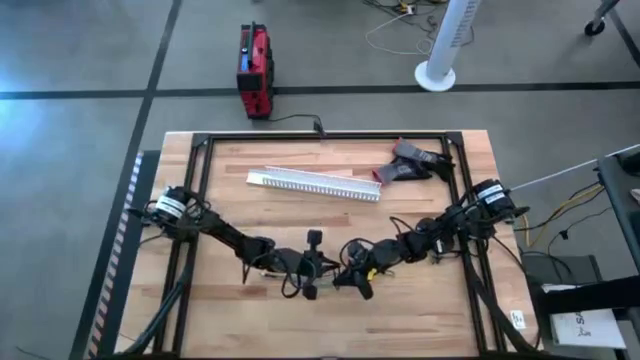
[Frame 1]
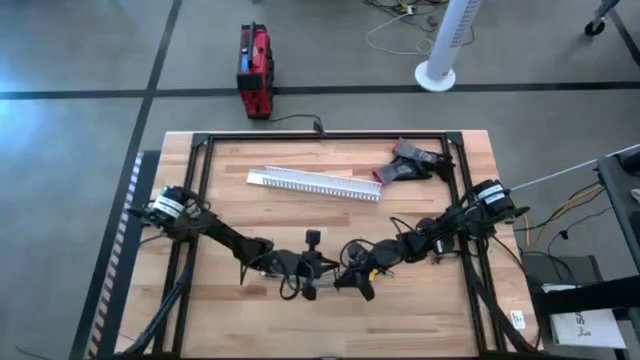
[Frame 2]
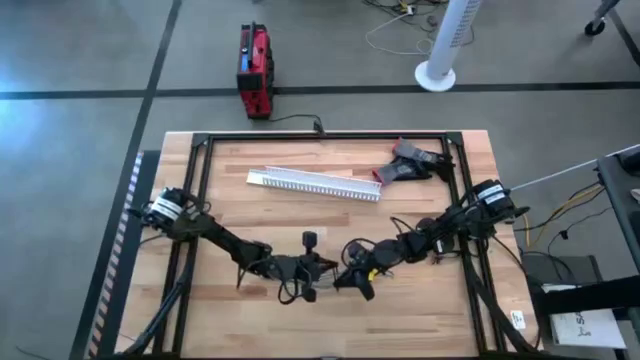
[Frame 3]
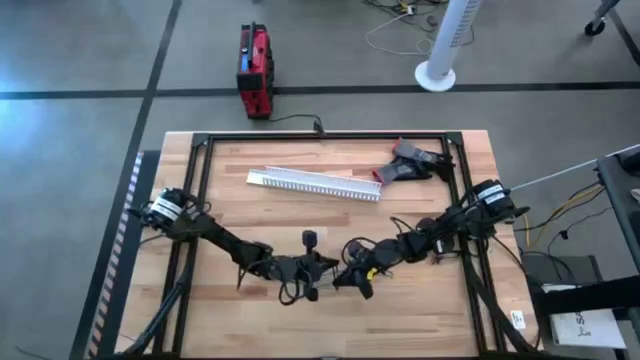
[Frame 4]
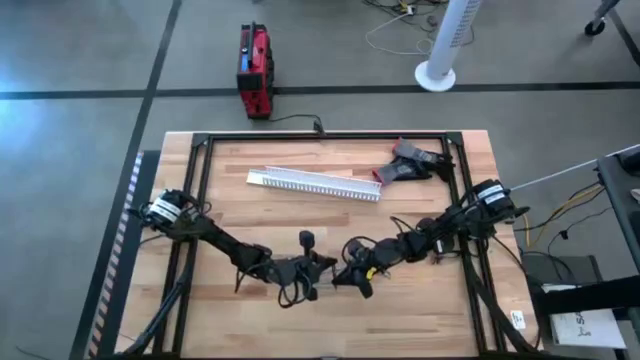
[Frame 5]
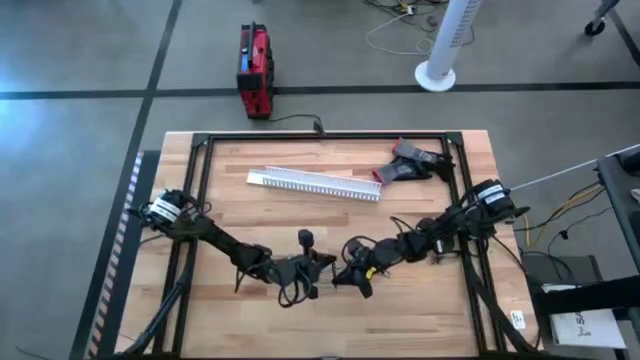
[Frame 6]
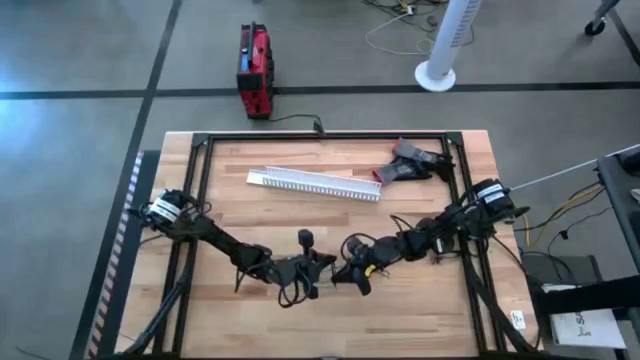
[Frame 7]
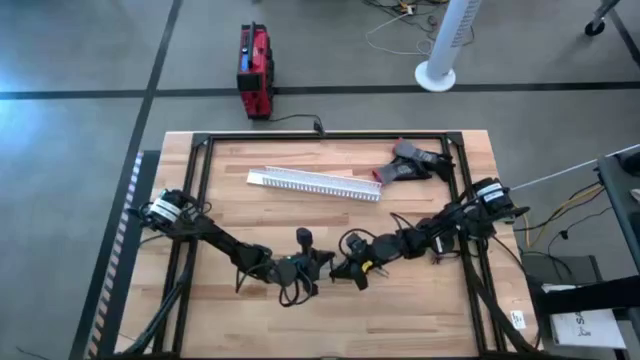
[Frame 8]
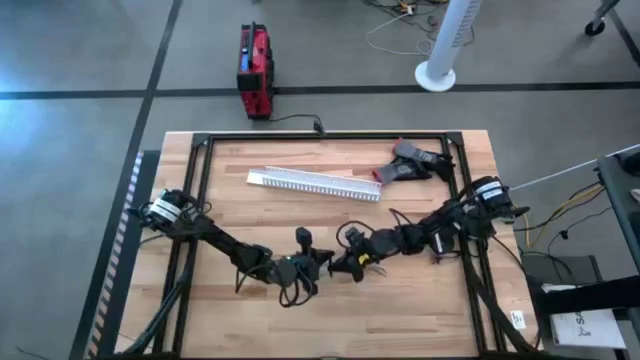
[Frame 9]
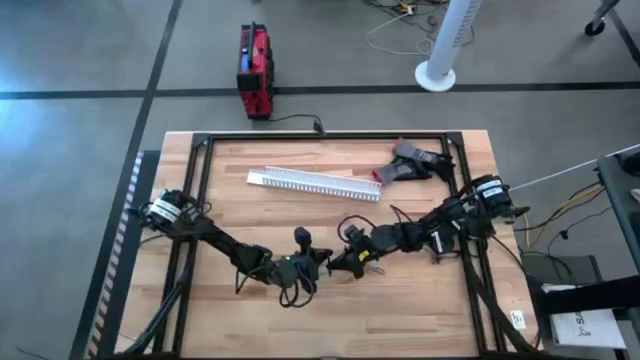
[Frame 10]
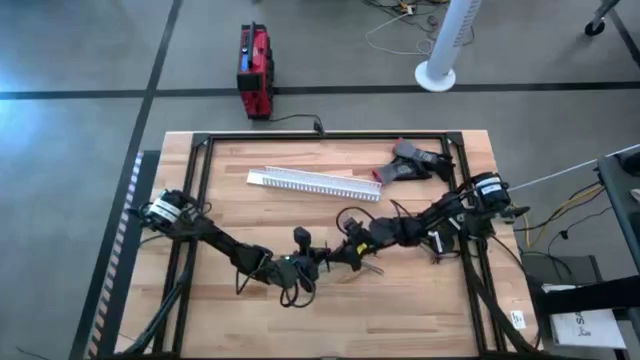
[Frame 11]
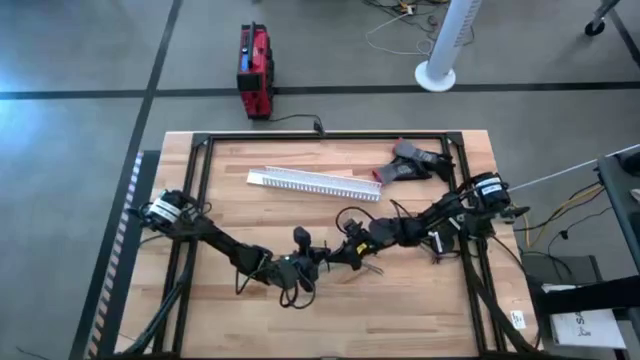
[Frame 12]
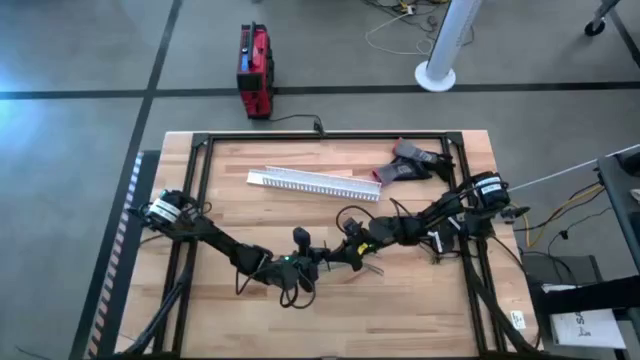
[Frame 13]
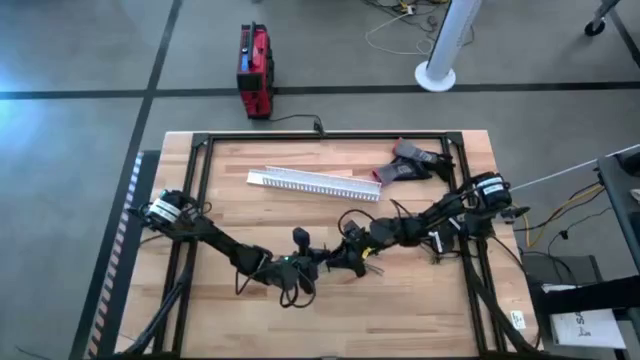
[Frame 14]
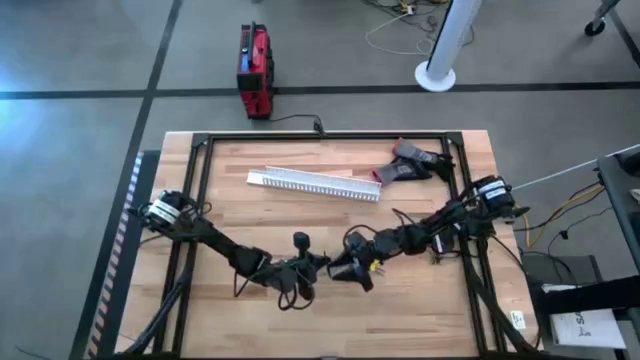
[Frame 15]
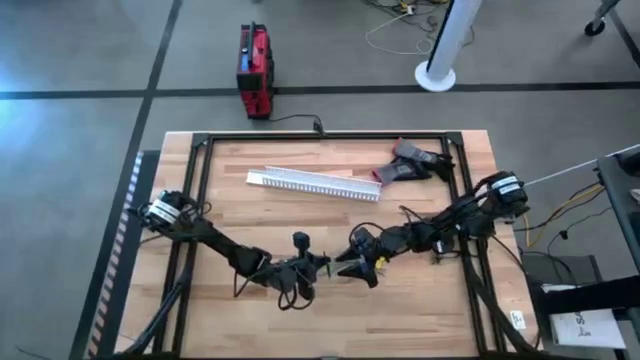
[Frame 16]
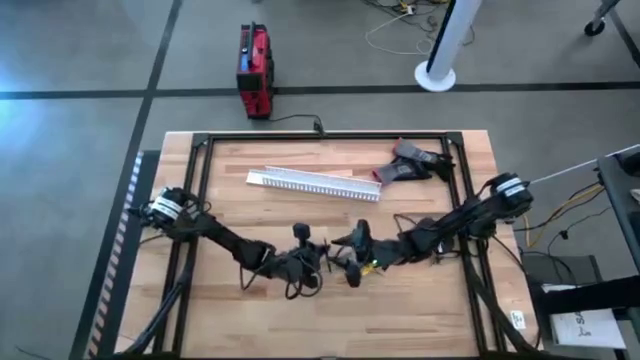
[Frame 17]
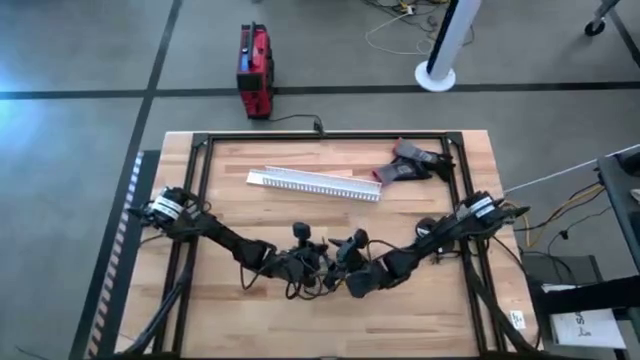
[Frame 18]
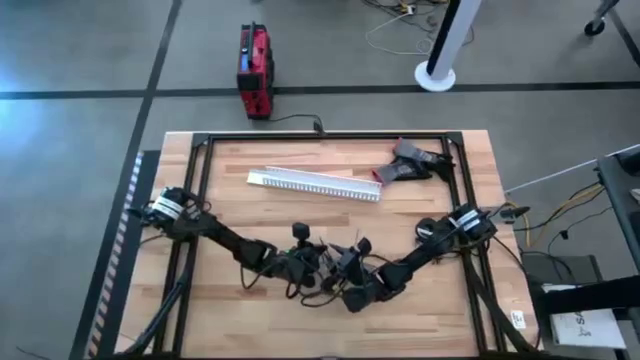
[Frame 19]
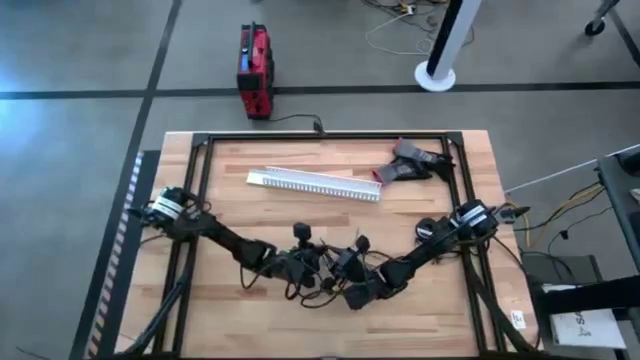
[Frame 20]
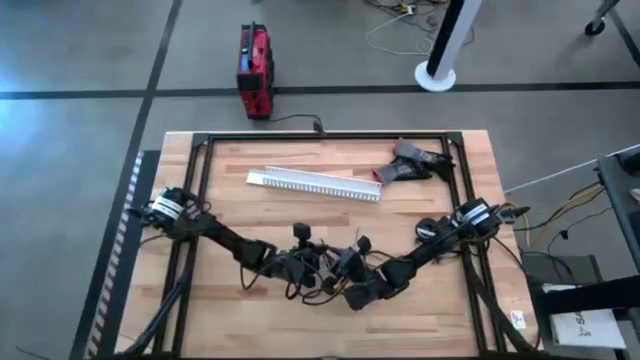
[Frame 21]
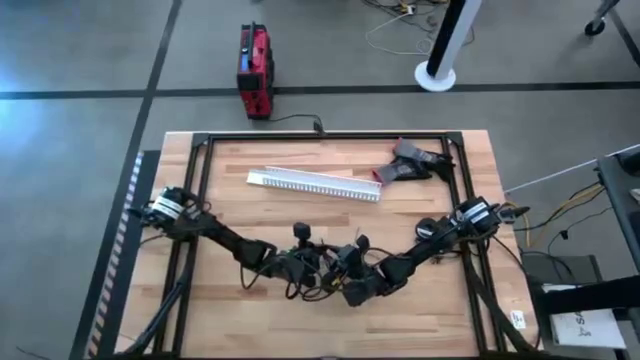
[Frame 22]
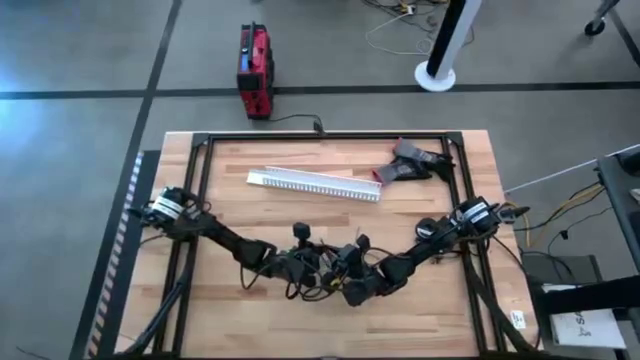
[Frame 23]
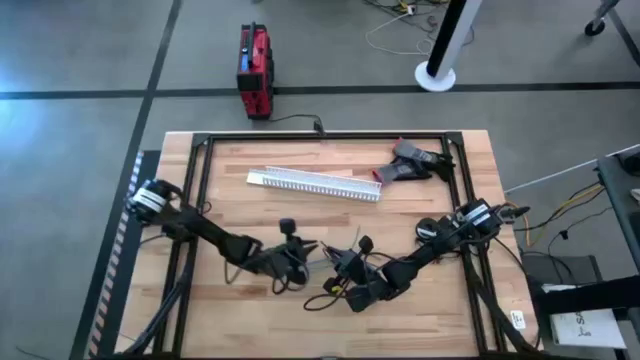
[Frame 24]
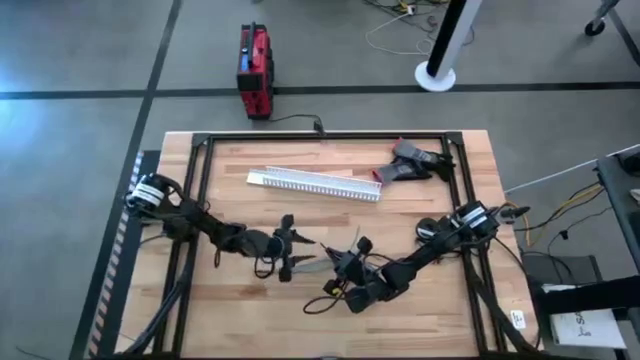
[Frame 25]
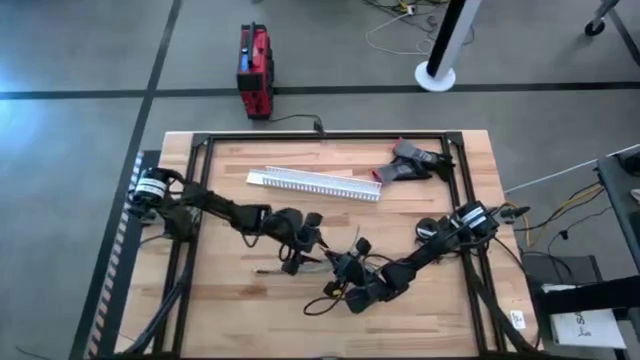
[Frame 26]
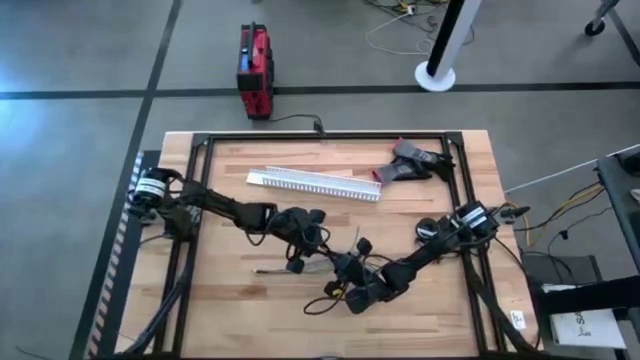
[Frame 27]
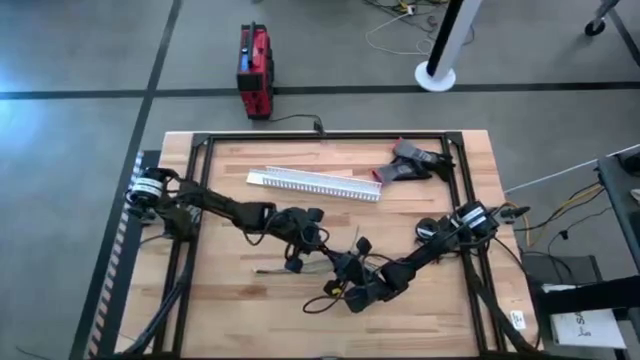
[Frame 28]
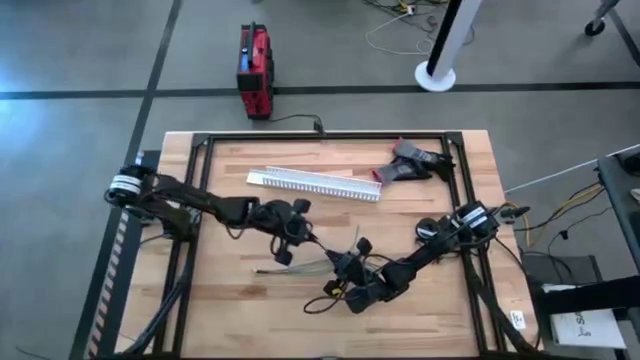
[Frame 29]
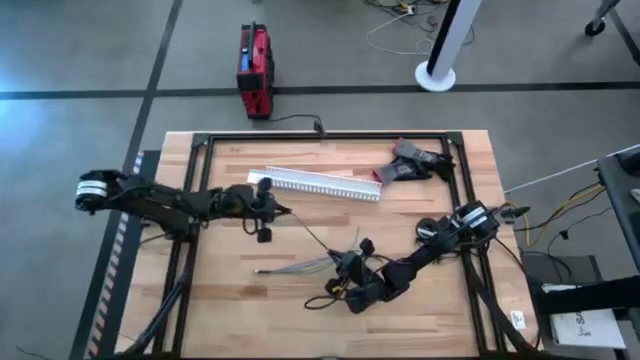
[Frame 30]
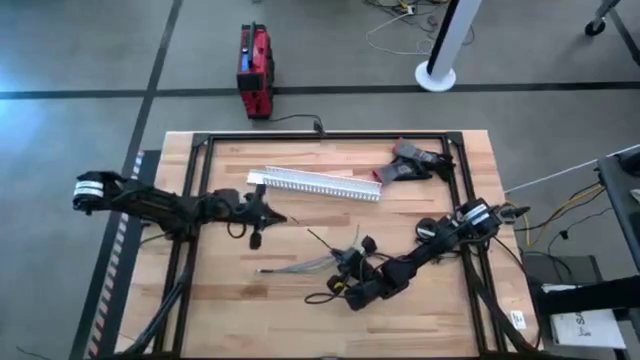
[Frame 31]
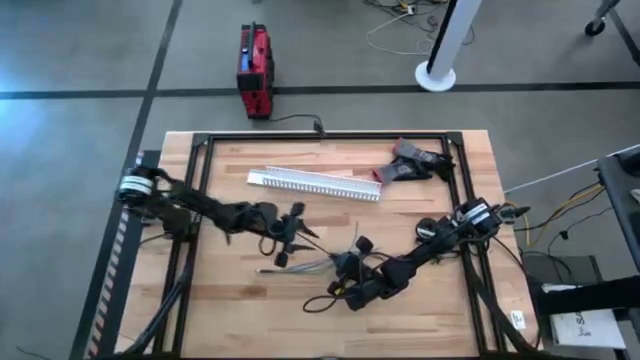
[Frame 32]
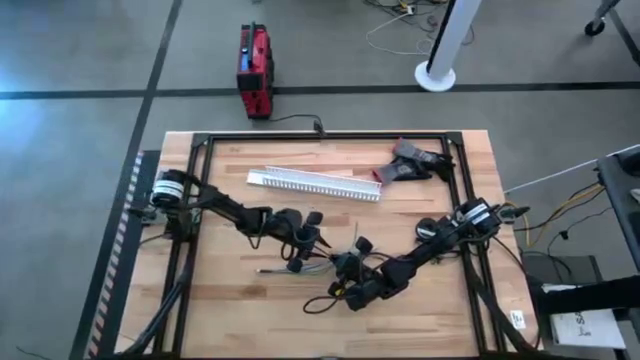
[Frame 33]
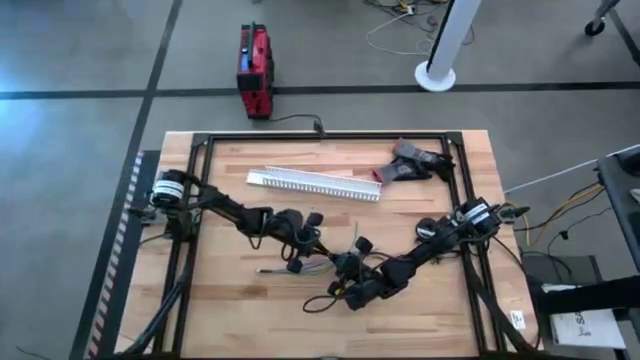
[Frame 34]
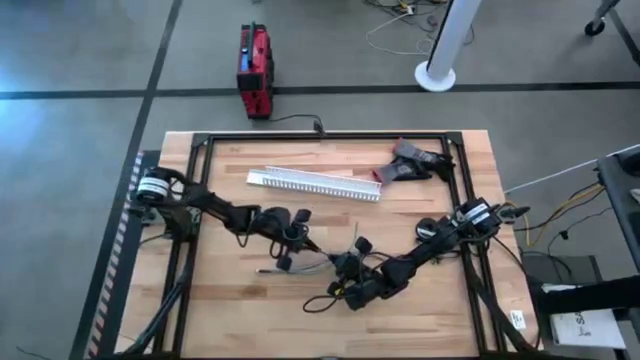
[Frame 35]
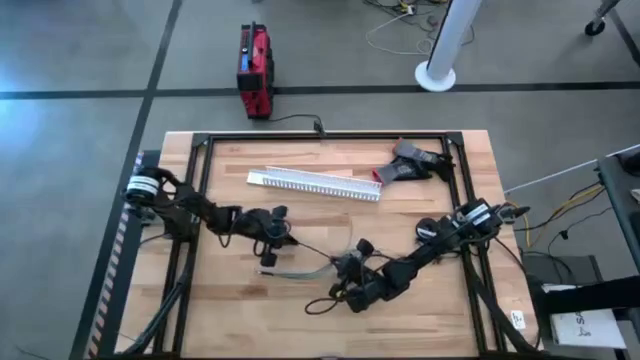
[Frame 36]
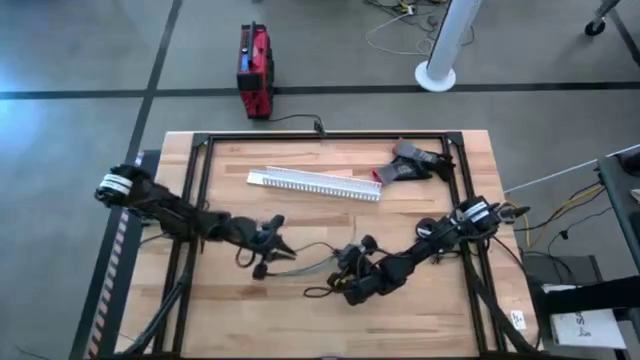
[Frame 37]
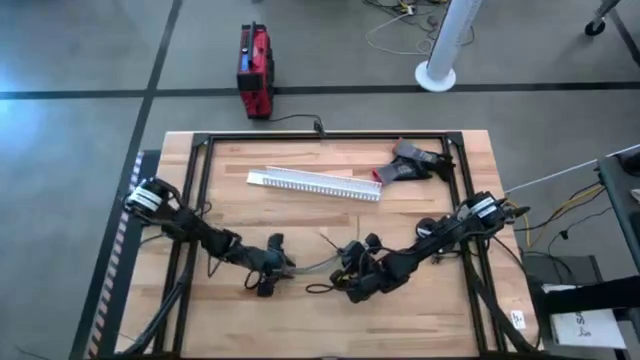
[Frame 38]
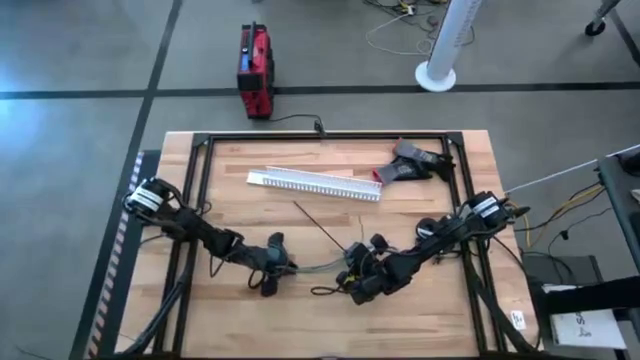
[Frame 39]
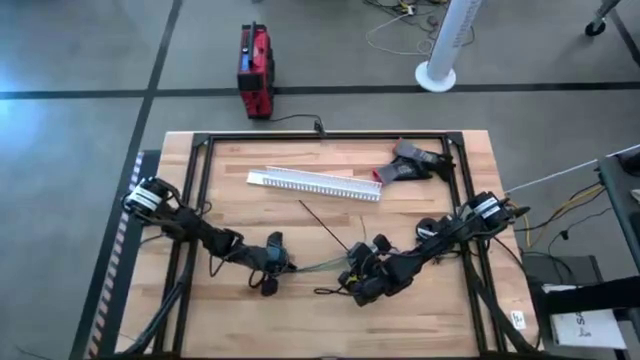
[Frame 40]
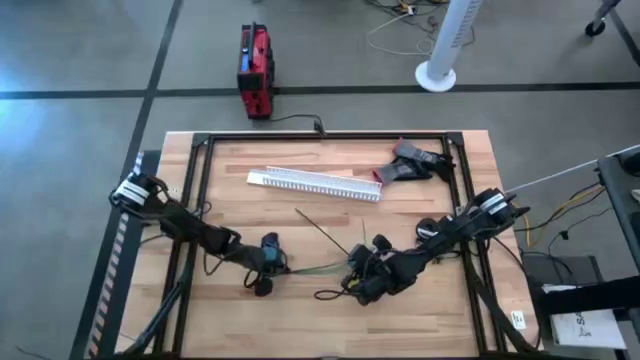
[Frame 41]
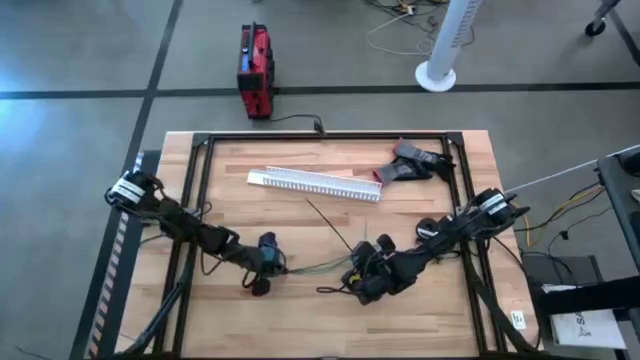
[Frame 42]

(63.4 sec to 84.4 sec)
Task: Ziptie cables
Insert the black ziptie on the cable wires
